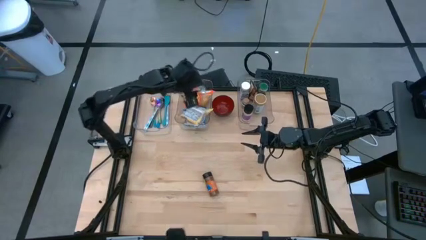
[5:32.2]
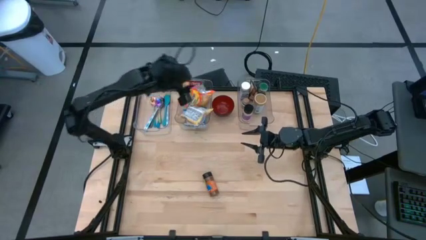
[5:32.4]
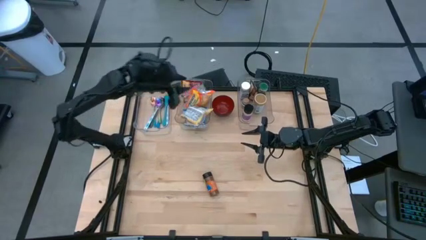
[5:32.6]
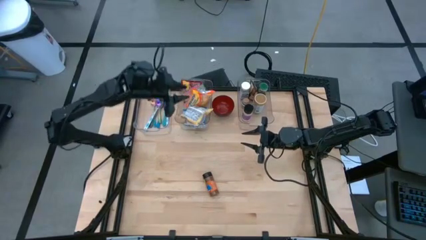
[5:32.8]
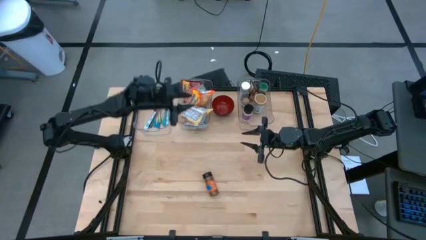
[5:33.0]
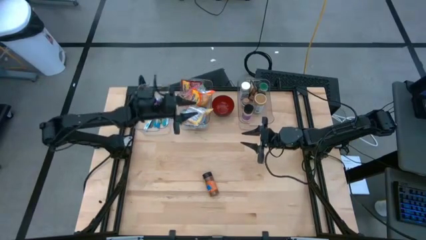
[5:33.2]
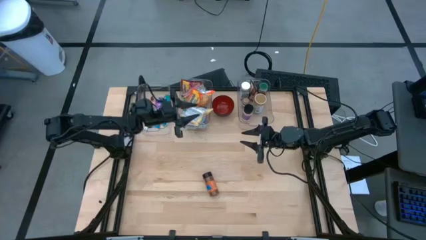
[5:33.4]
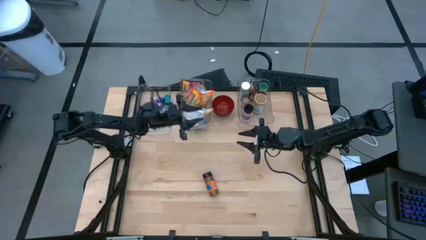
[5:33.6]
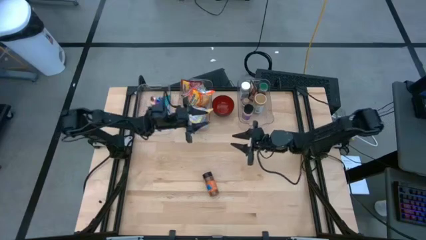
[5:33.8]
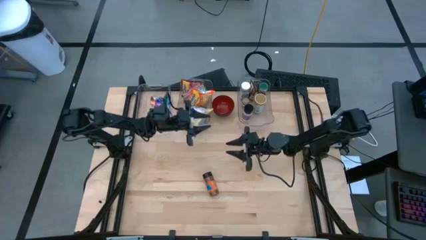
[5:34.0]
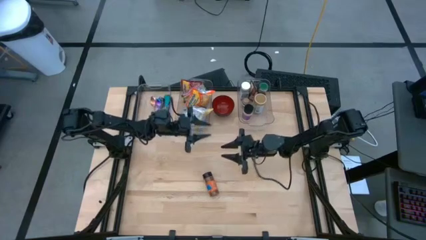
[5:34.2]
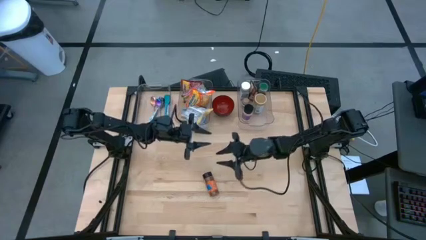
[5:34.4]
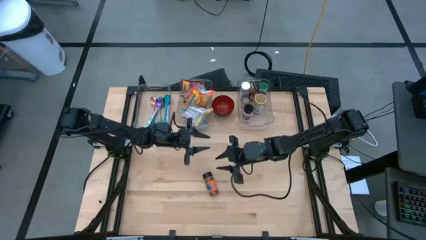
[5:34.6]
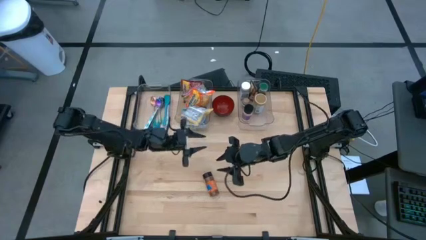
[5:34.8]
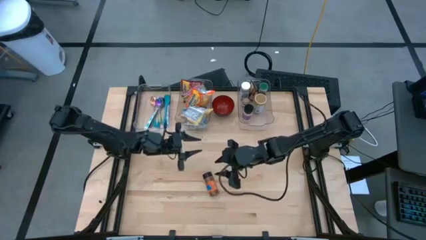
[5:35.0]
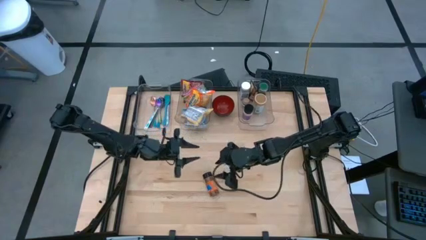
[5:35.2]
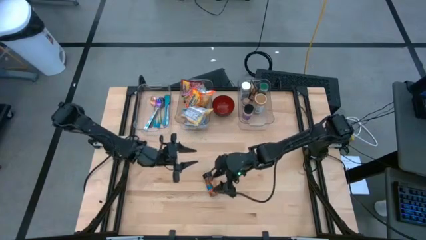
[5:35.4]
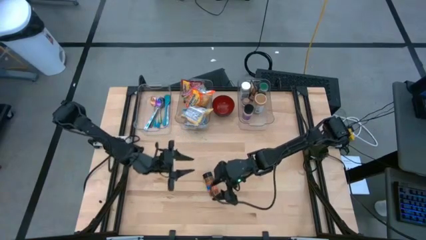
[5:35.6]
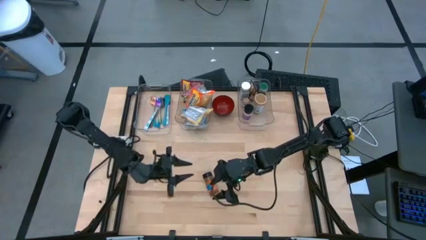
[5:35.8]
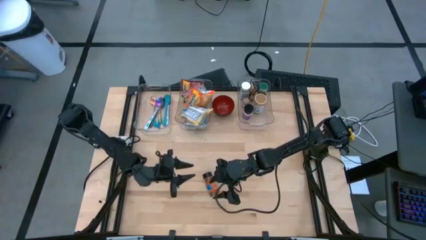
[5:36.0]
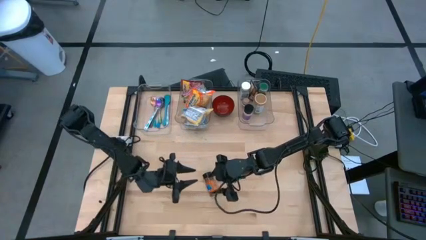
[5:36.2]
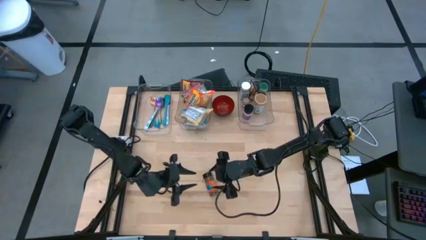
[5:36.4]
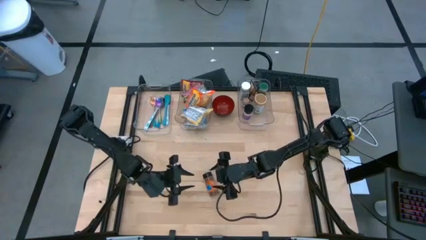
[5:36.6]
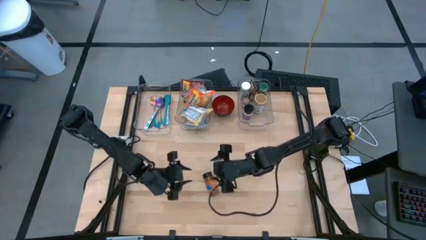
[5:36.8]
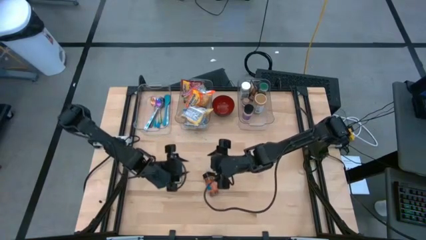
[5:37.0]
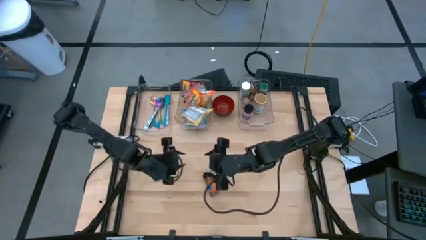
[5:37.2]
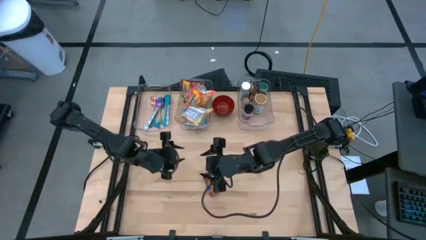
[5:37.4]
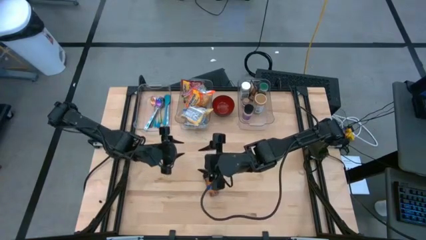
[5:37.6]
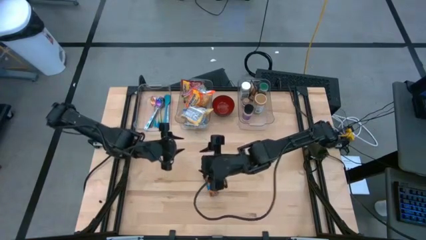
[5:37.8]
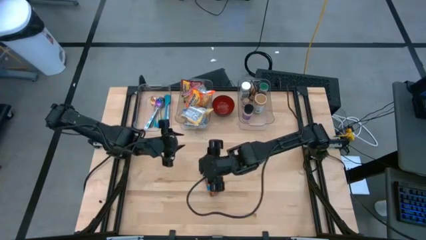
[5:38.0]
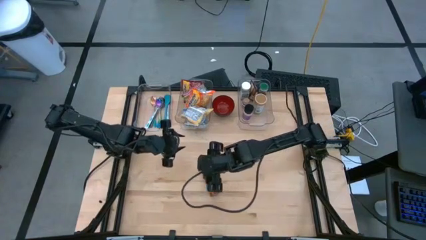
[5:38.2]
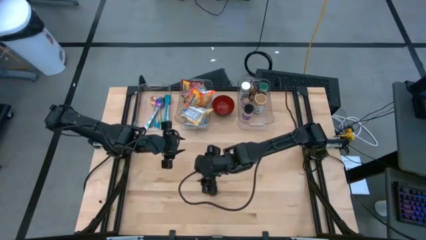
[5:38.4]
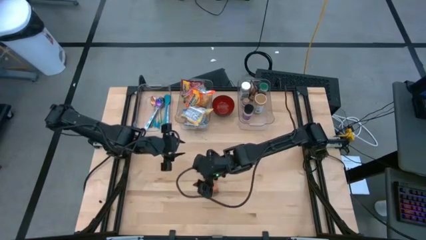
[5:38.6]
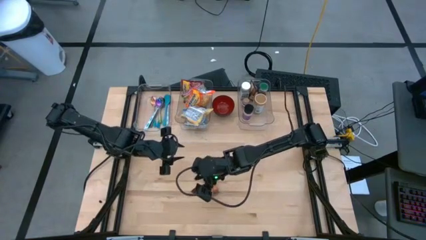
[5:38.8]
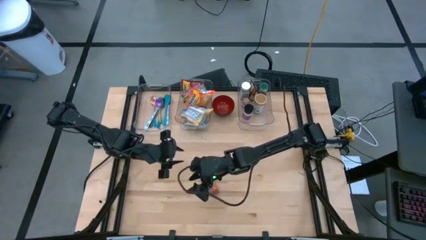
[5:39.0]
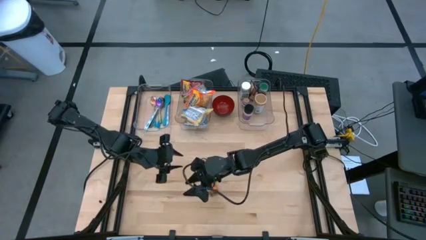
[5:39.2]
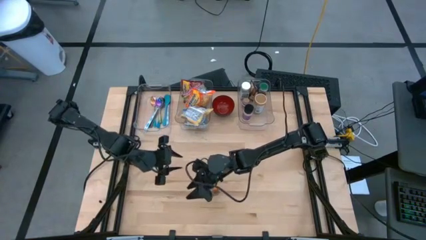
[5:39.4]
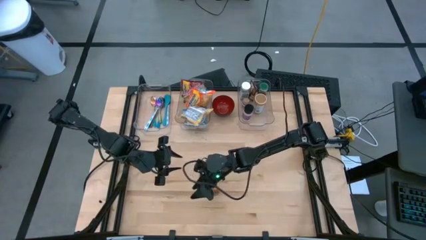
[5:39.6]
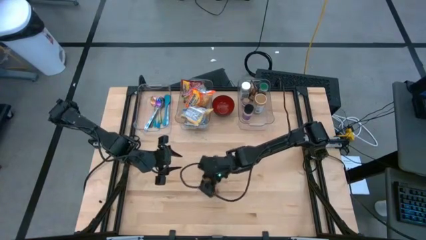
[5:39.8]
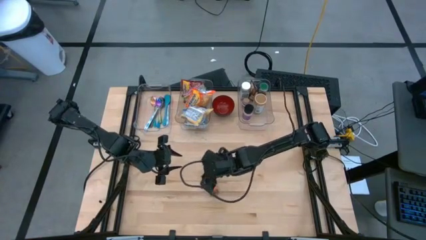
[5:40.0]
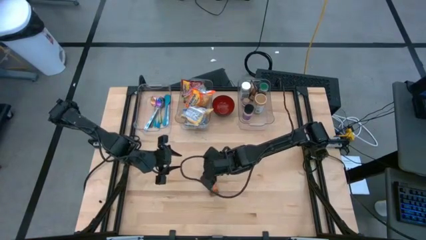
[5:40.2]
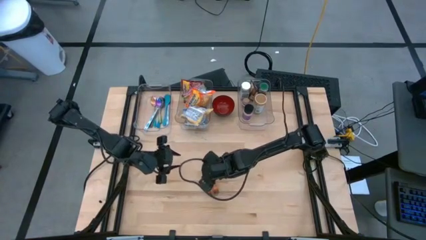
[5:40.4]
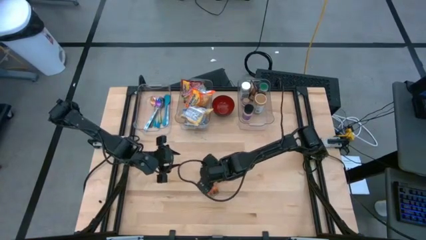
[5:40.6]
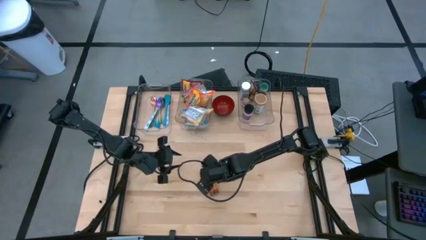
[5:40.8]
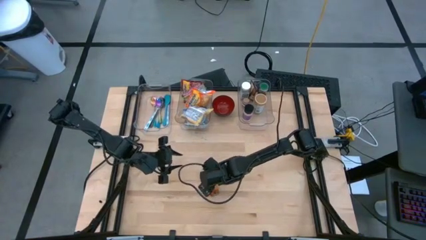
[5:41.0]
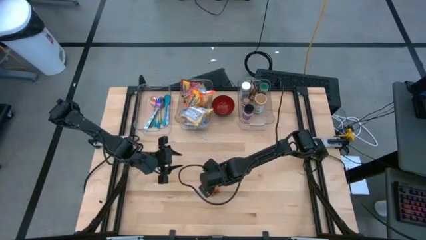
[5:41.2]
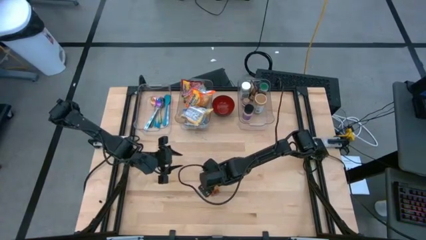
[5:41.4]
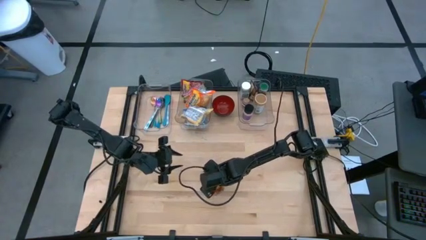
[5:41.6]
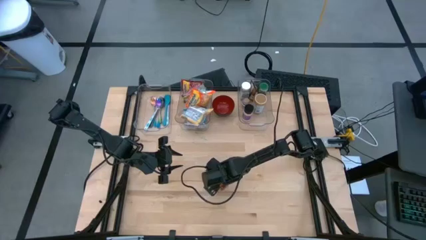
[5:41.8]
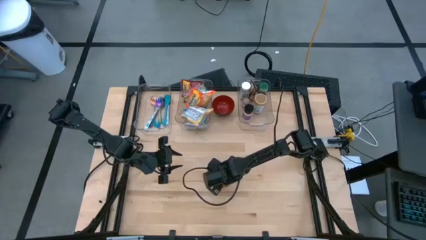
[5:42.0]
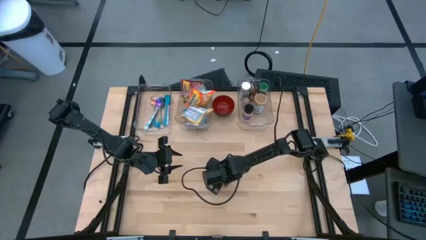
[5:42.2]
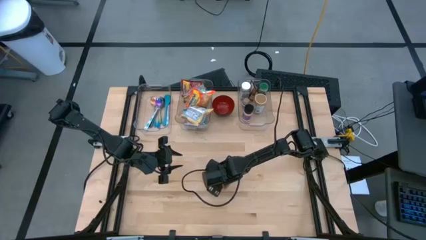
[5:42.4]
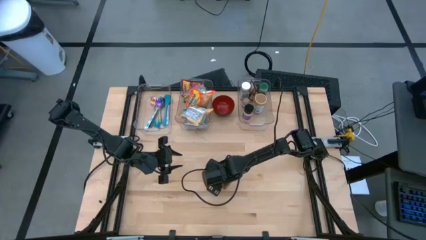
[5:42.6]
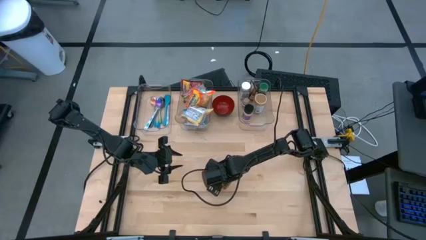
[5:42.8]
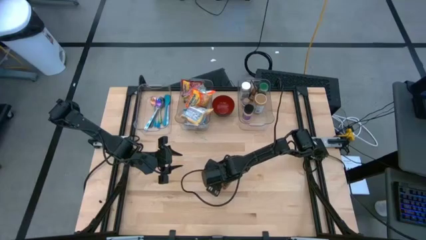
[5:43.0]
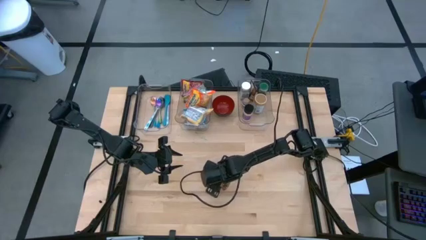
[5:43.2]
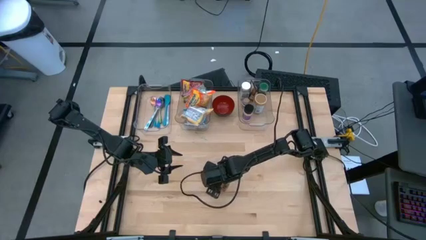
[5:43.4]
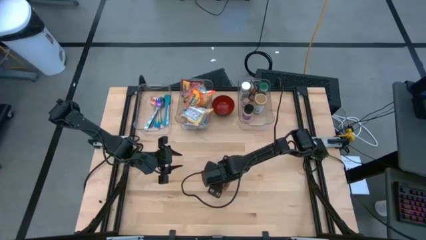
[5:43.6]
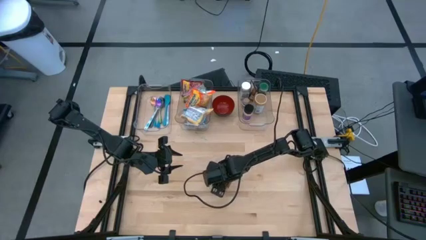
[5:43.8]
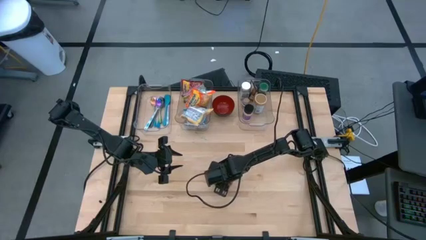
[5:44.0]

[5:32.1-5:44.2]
Task: Pick & Place Food Item
Put the orange seasoning bottle into the right transparent bin
